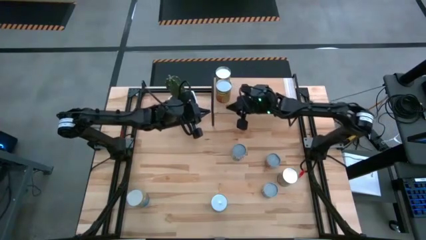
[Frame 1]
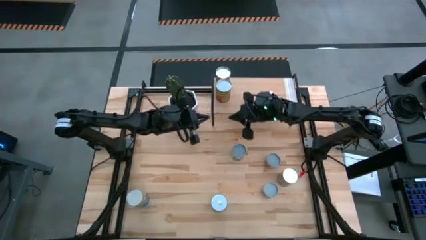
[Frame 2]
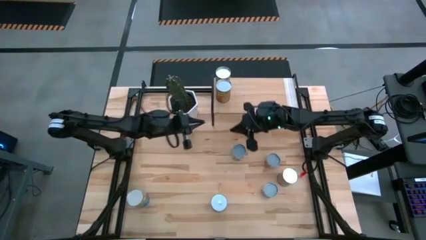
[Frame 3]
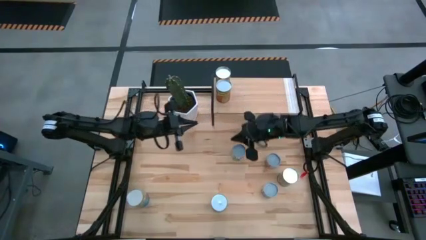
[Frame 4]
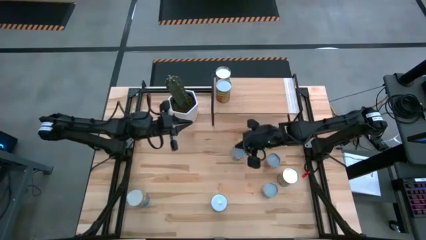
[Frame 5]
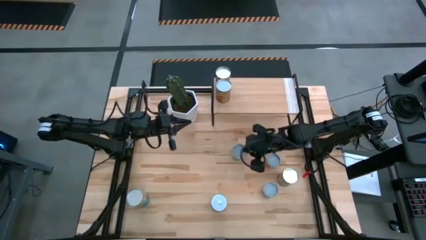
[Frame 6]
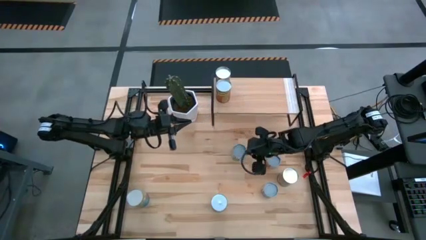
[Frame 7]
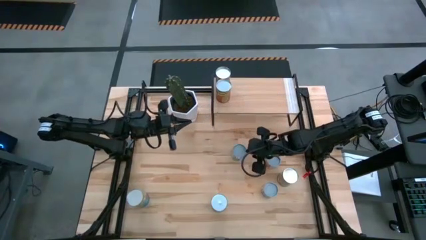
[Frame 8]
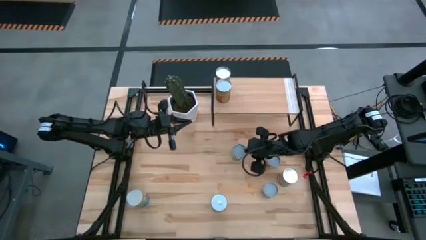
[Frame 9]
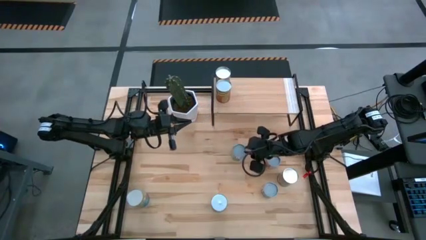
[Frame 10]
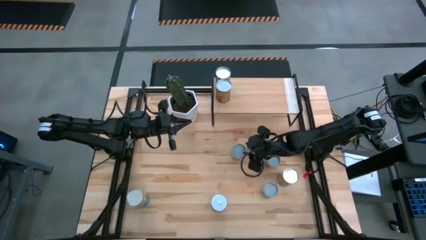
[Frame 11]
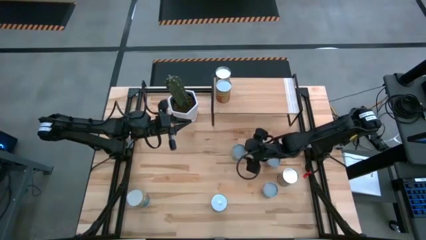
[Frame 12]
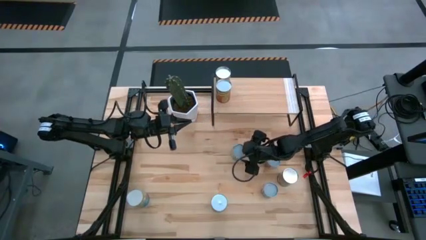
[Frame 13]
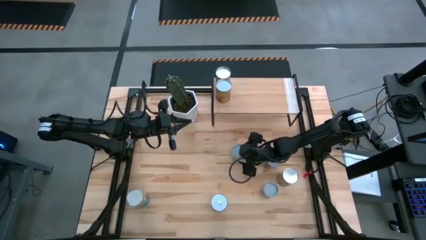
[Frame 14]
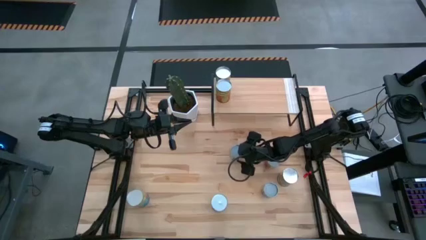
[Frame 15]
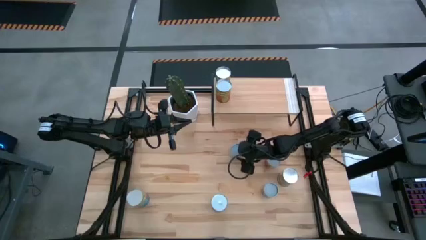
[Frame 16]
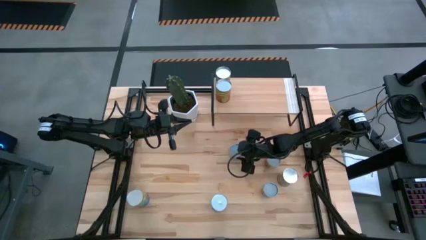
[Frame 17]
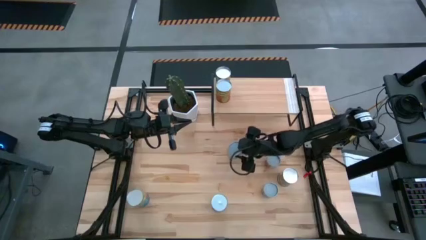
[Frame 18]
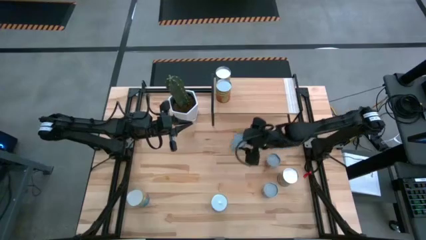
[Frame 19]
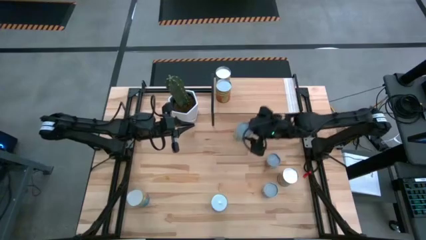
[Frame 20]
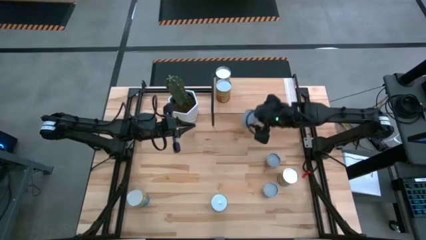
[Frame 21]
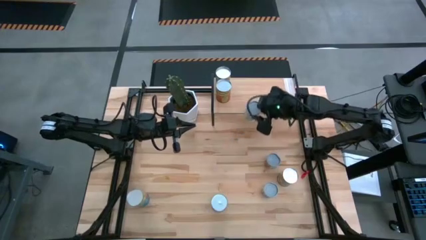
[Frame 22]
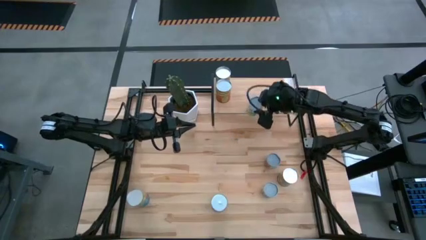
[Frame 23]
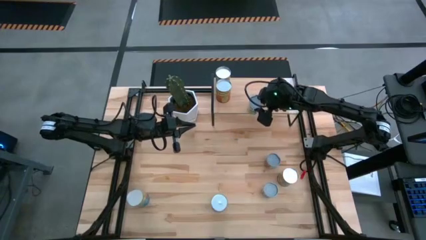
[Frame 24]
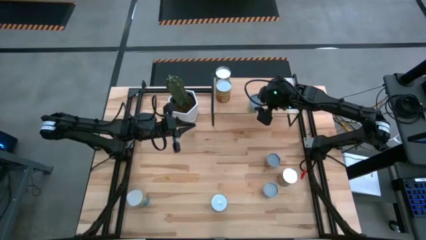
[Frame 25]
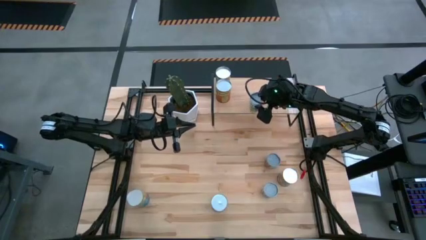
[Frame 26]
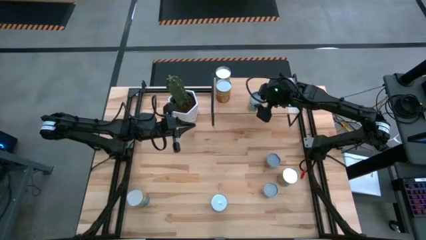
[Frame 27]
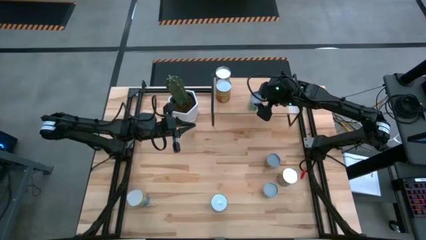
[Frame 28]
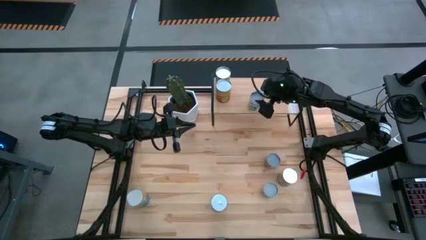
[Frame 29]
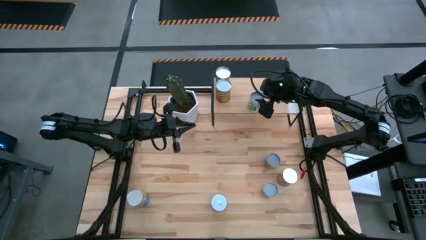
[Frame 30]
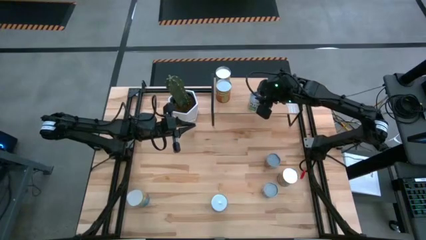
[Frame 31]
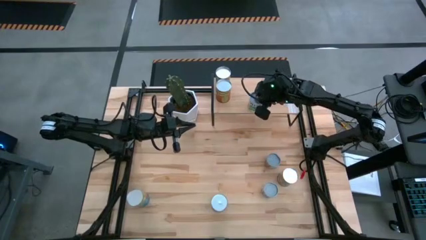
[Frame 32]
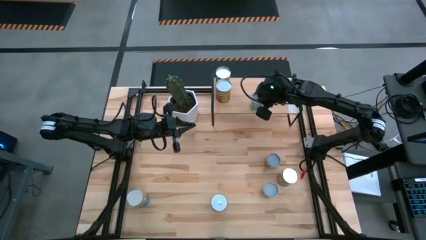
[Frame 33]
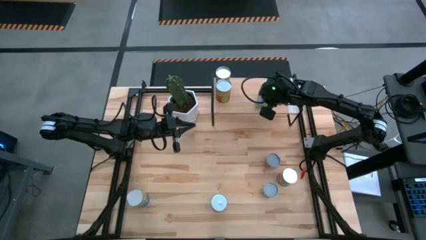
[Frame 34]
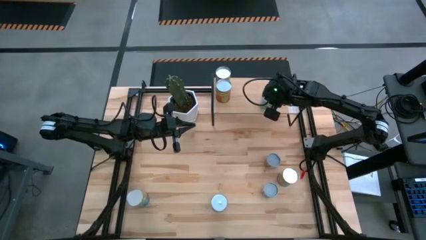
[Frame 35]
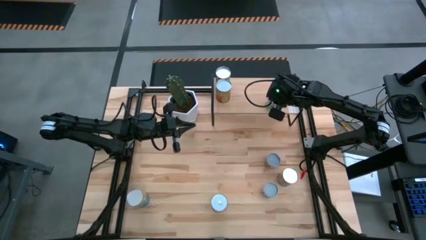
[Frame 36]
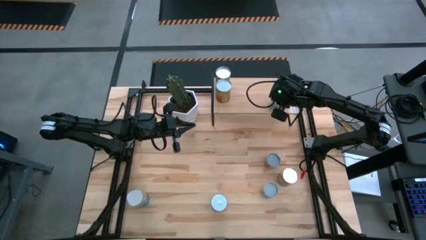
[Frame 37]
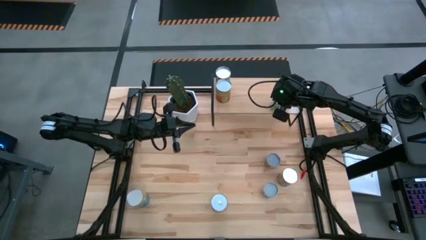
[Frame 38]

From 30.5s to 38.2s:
Task: Pick and place cans onto a shelf
Put the canned mixed fruits on the shelf

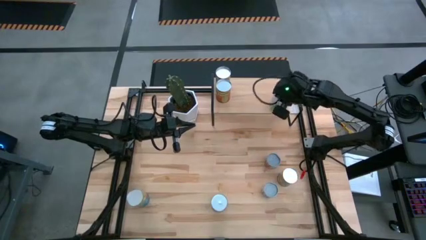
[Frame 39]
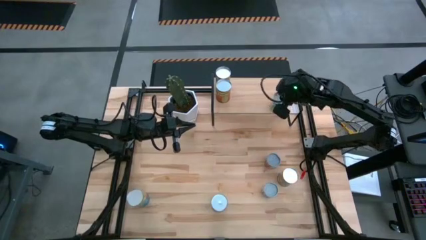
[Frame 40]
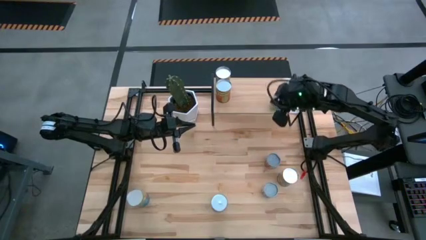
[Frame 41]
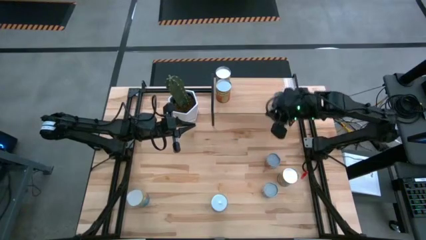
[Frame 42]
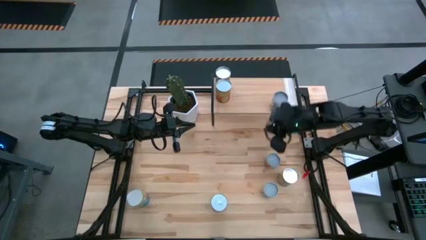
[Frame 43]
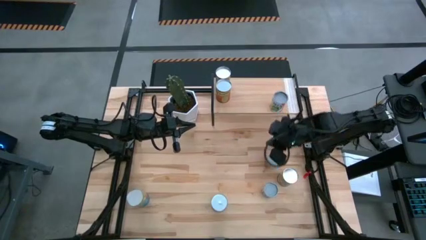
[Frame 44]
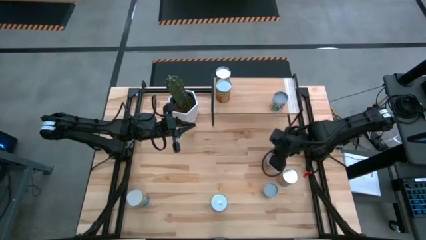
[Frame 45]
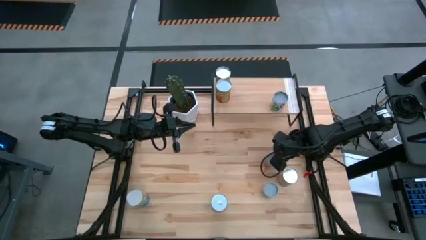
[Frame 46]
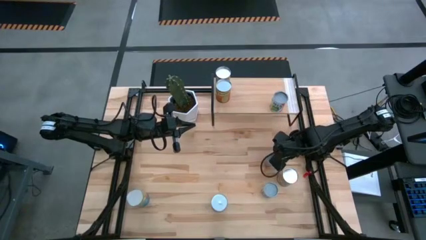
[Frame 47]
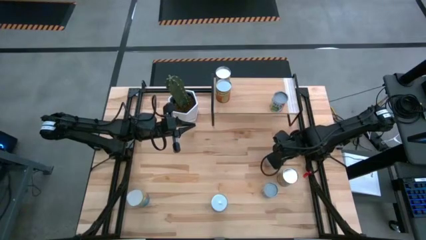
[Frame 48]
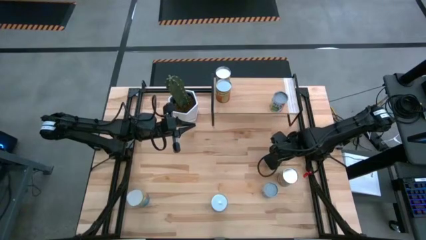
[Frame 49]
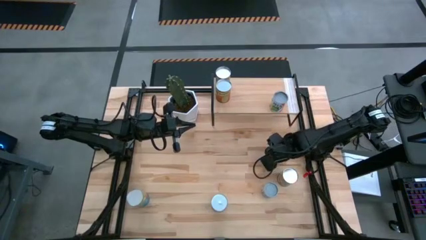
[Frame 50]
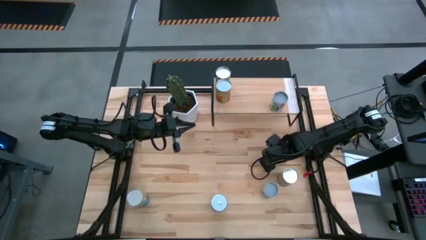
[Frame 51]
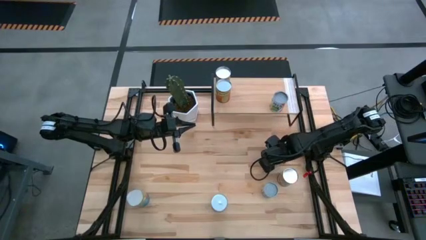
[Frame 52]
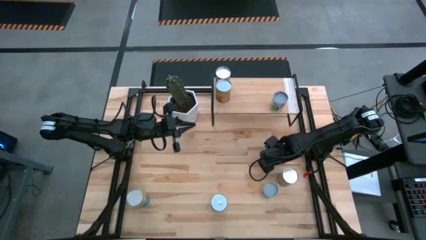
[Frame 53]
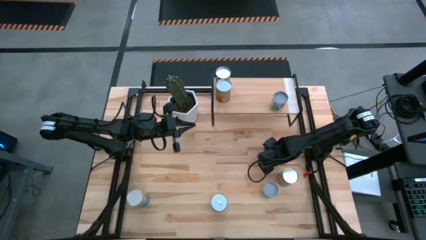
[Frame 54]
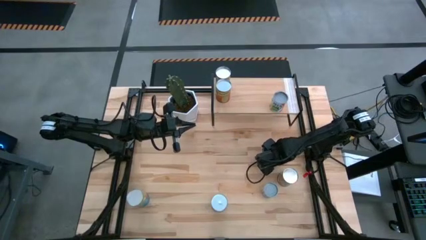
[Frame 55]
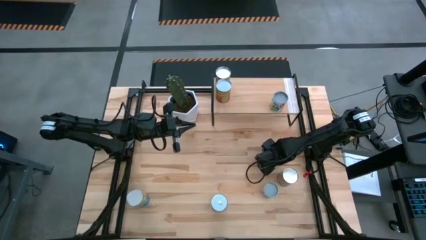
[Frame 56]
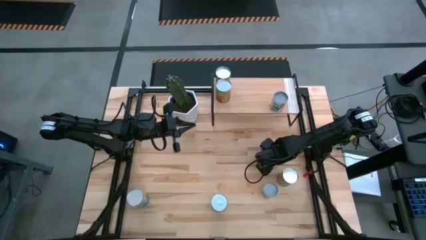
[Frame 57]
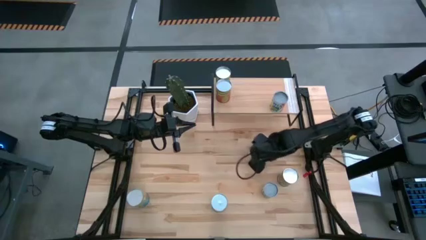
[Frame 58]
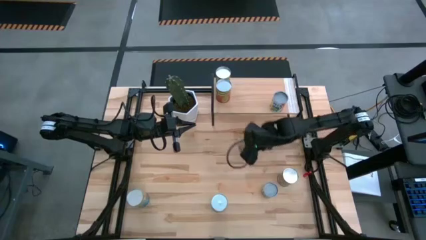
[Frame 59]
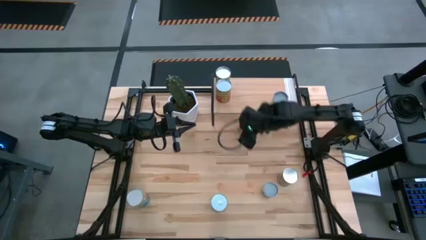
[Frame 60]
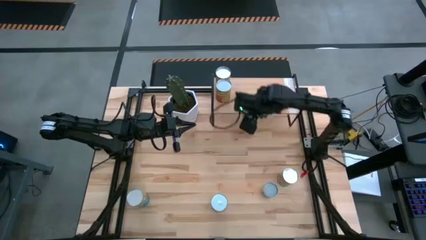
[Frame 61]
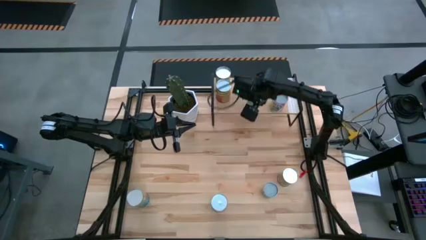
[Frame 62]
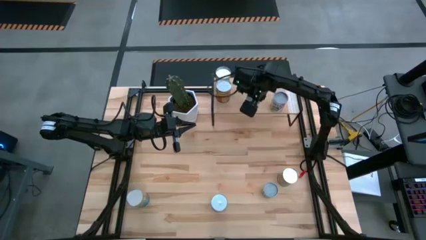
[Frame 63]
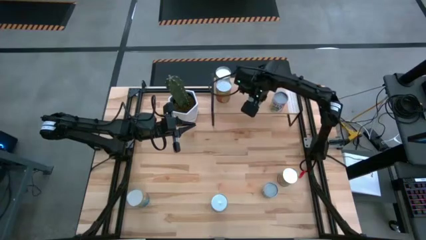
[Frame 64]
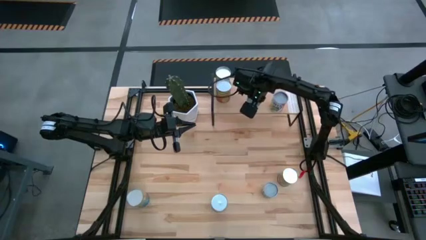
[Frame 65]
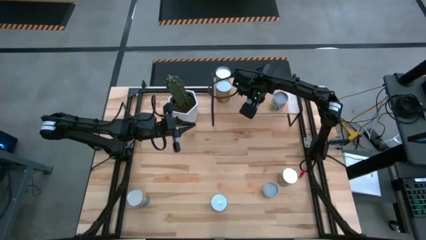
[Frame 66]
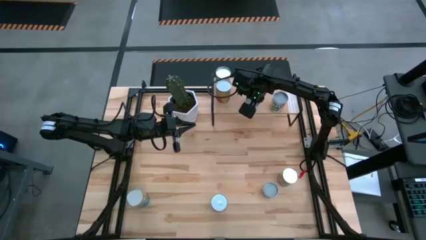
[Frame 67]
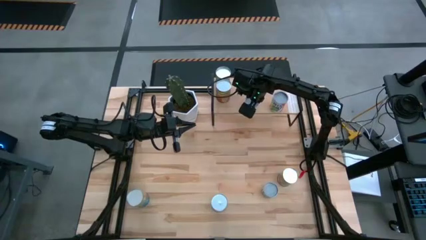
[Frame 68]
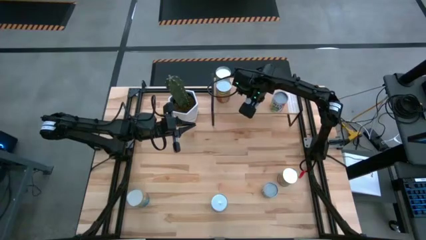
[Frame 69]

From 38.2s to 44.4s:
Put the canned mandarin oranges on the shelf
